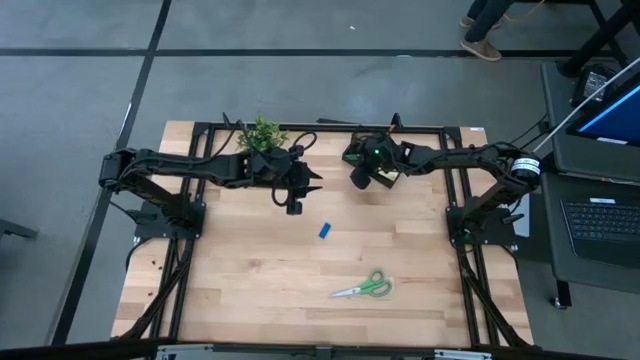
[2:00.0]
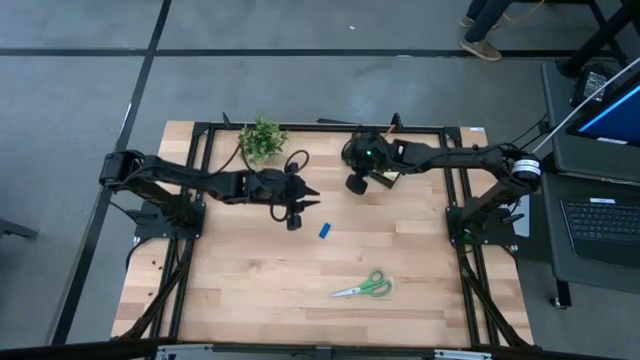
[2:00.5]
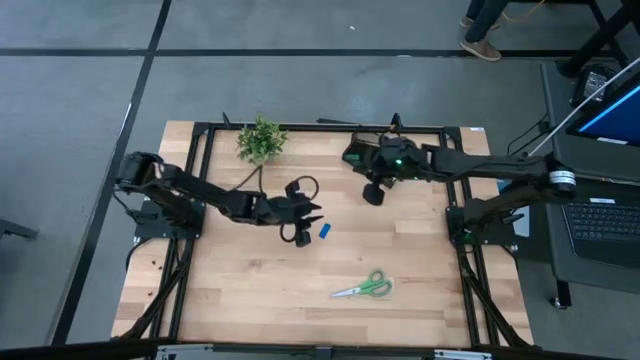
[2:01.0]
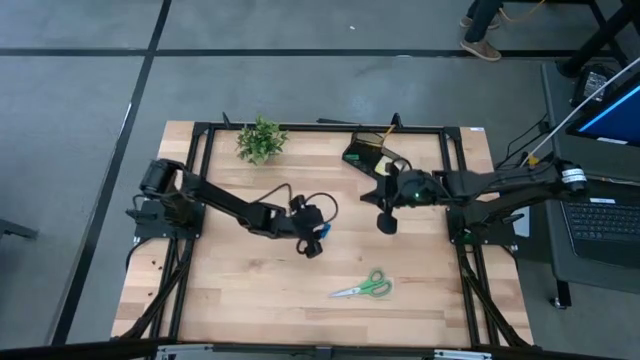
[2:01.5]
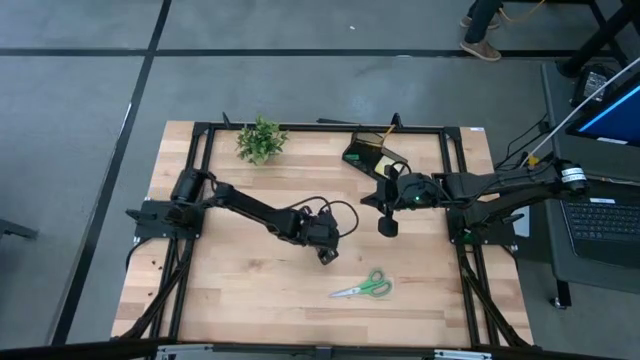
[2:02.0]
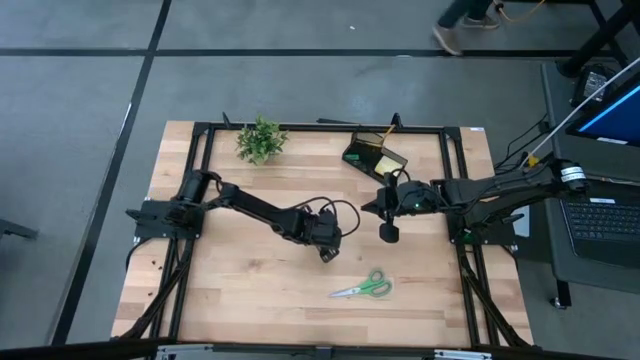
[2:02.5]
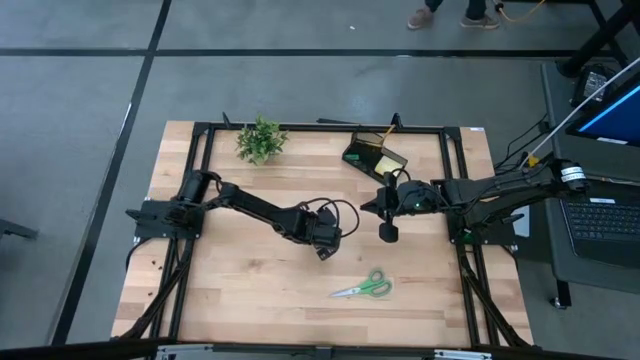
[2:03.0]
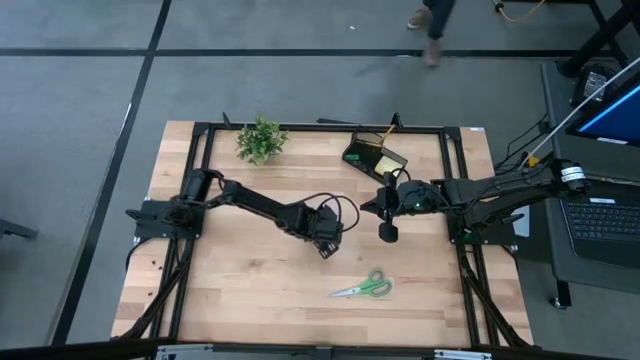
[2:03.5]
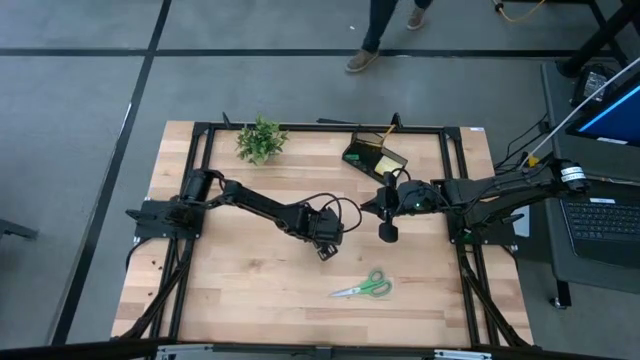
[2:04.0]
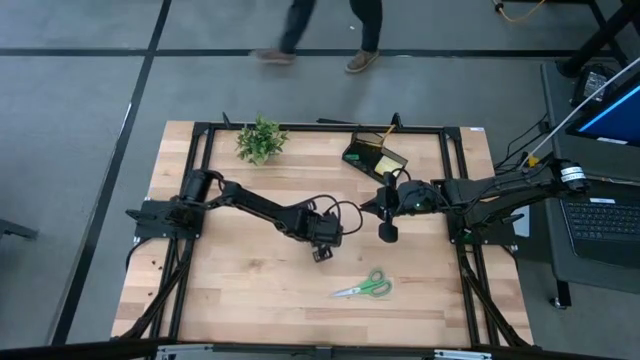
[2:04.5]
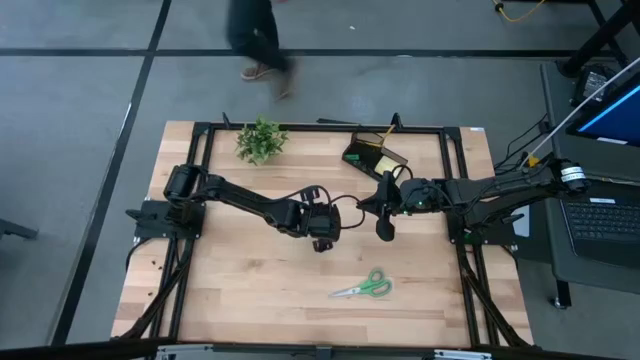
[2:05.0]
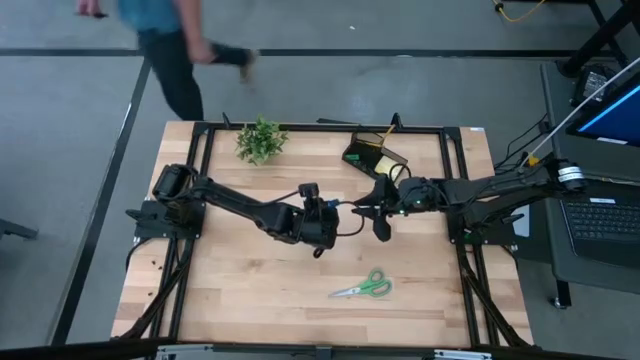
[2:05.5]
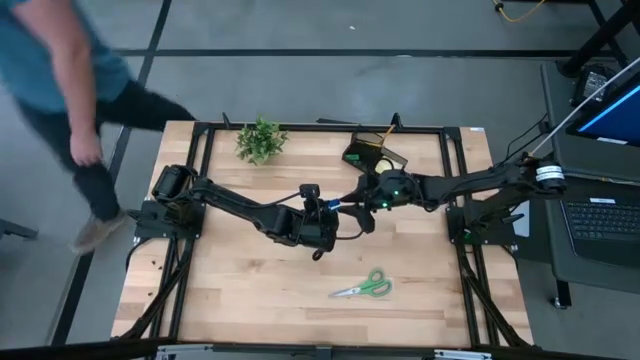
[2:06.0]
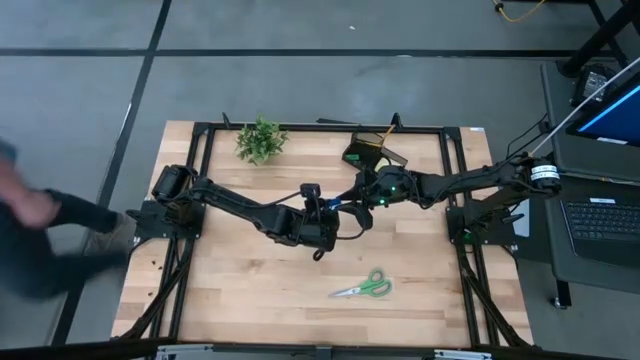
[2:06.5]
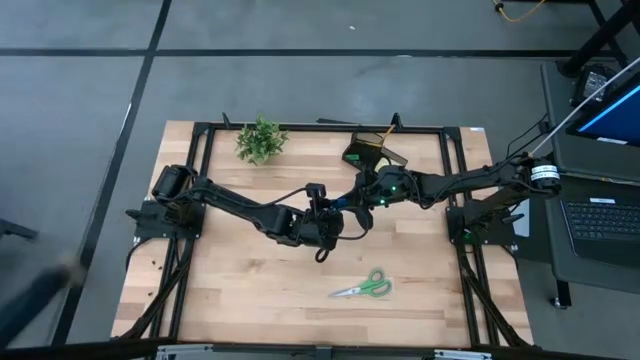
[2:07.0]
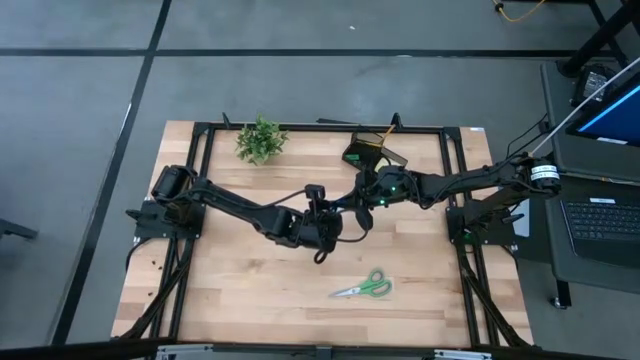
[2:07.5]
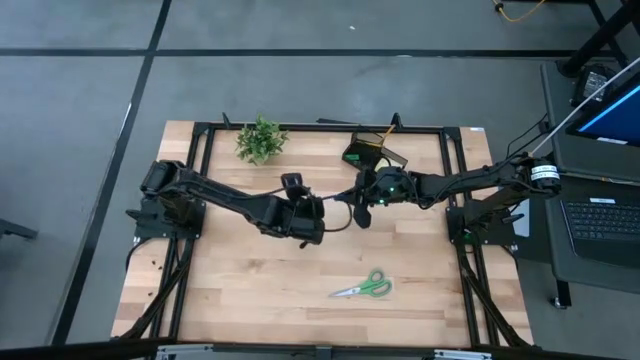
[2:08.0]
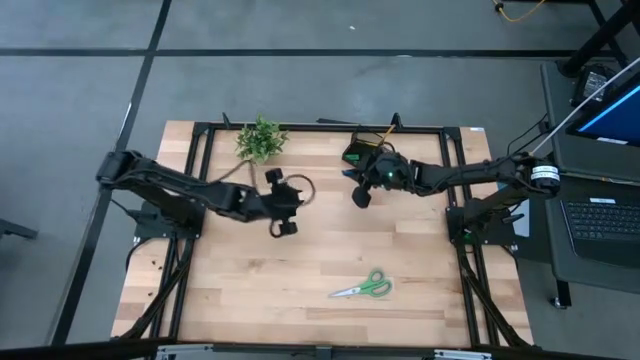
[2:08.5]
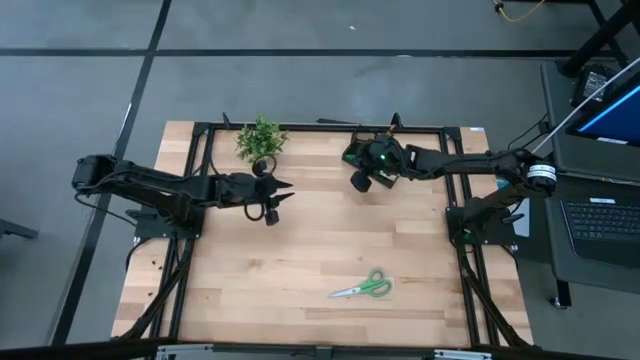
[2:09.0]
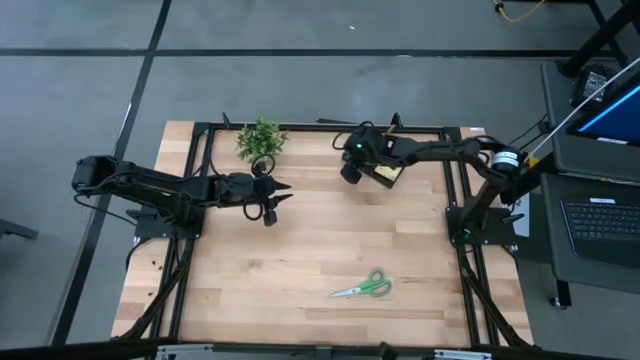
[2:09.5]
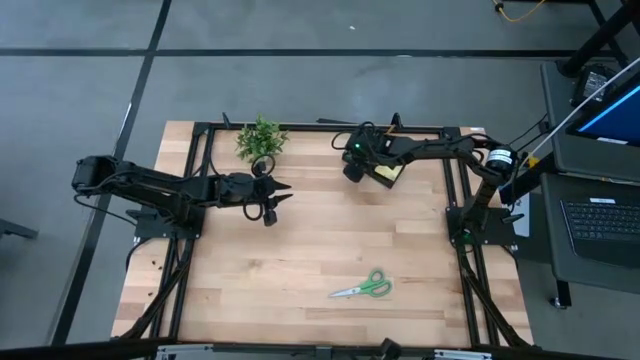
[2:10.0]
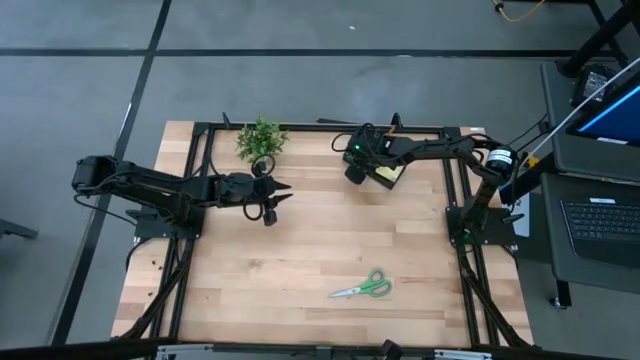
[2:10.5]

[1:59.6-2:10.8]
Task: Pick and place office supplies into organizer
Put the blue eraser into the black desk organizer

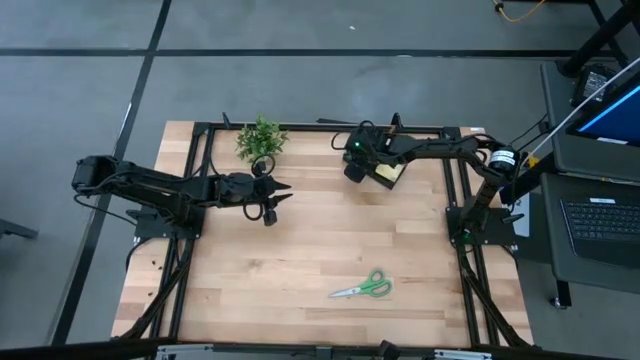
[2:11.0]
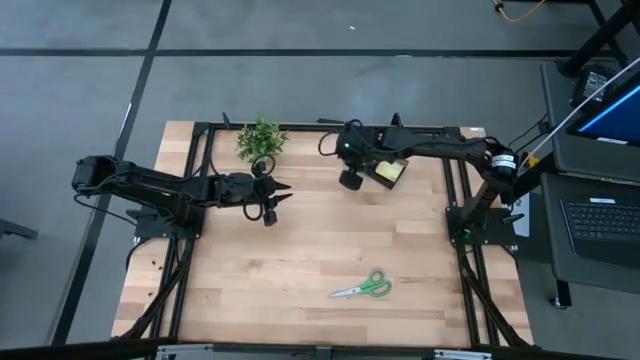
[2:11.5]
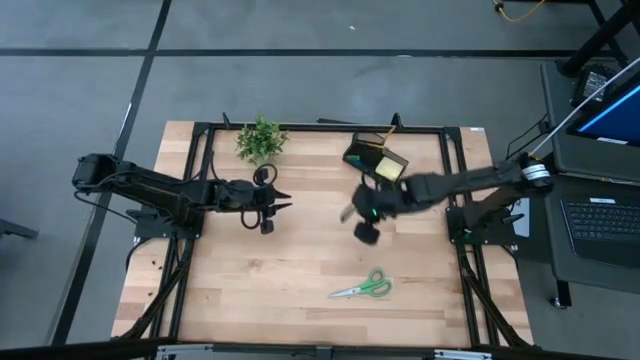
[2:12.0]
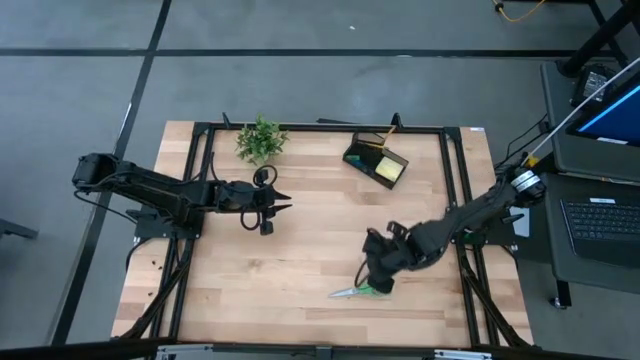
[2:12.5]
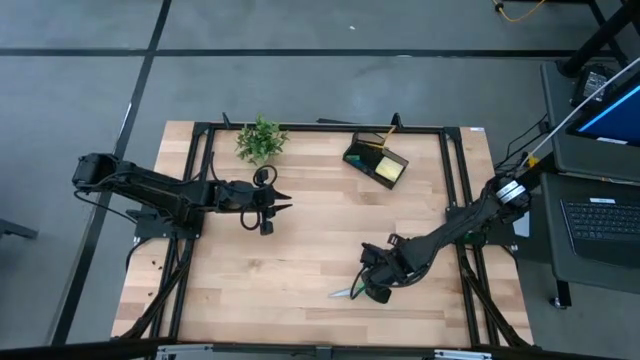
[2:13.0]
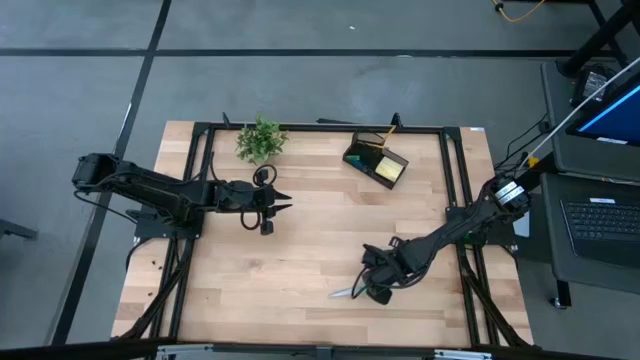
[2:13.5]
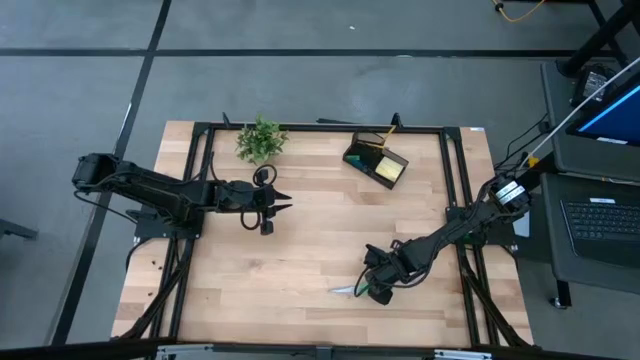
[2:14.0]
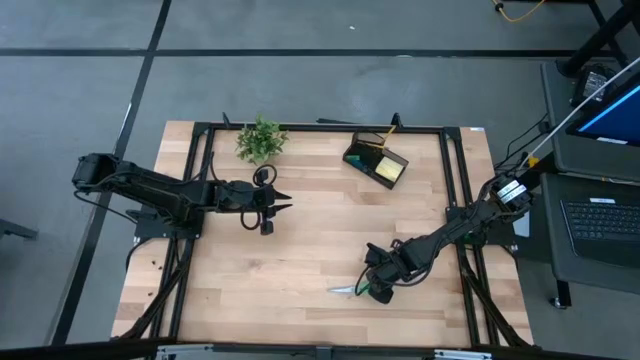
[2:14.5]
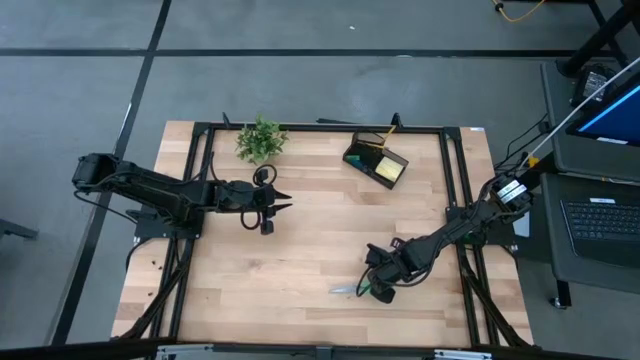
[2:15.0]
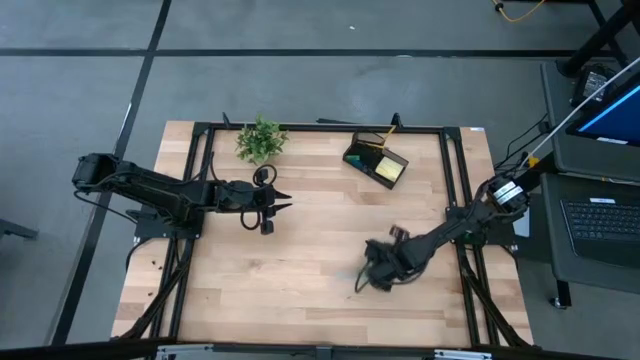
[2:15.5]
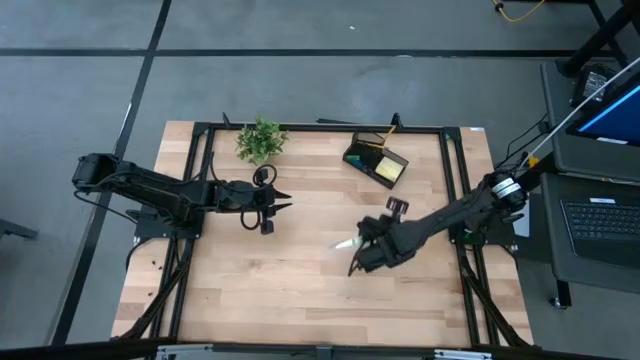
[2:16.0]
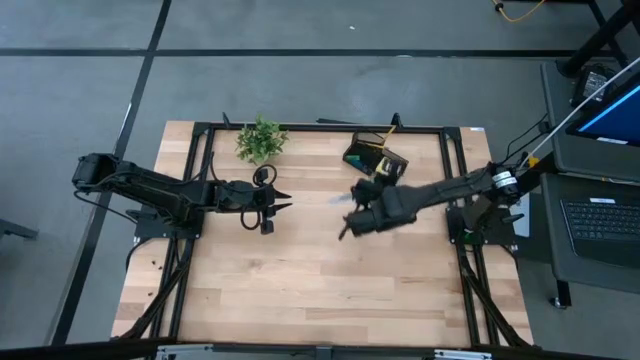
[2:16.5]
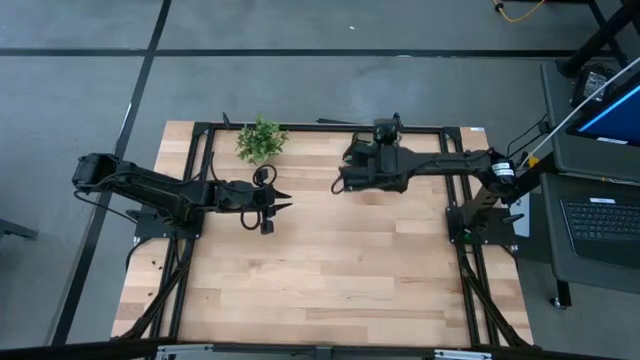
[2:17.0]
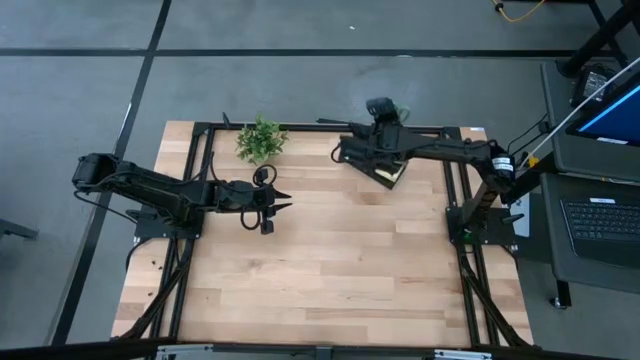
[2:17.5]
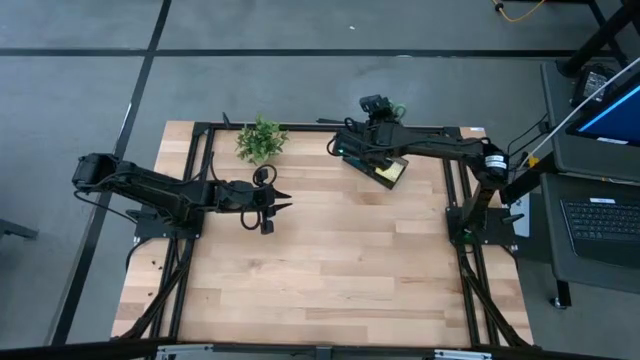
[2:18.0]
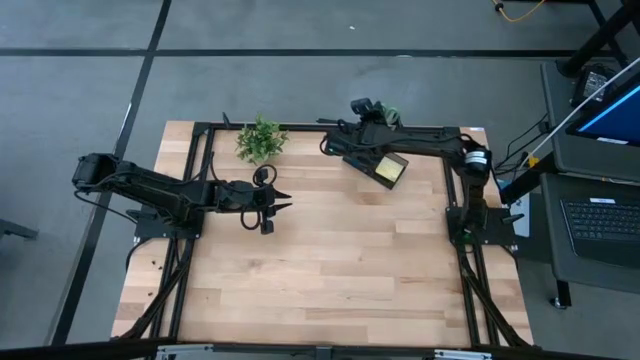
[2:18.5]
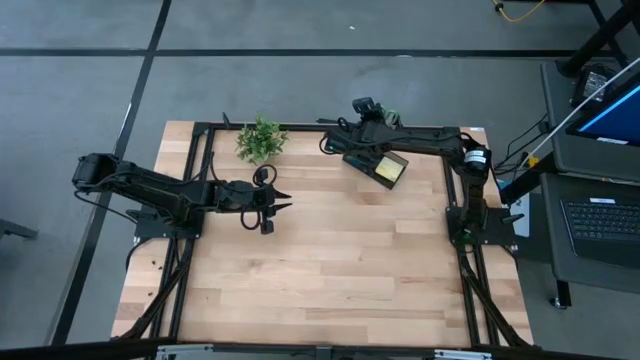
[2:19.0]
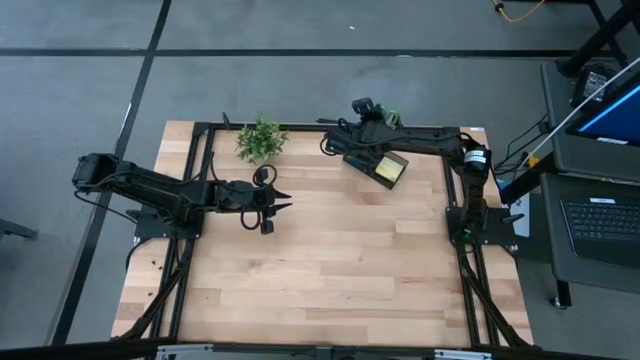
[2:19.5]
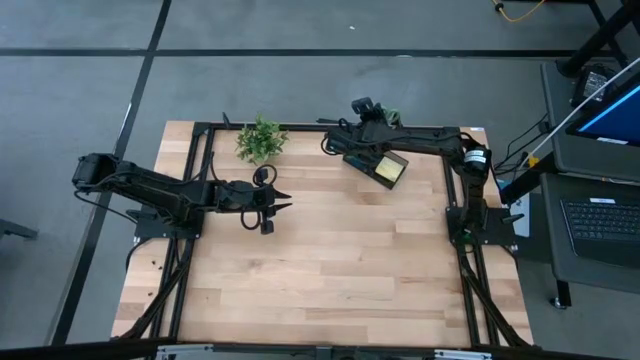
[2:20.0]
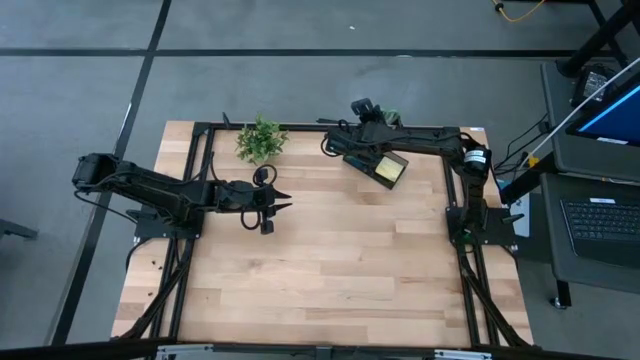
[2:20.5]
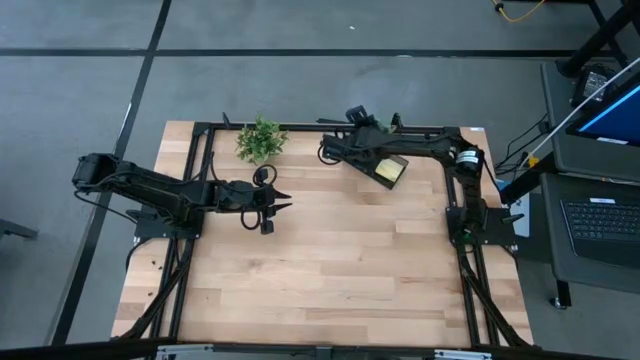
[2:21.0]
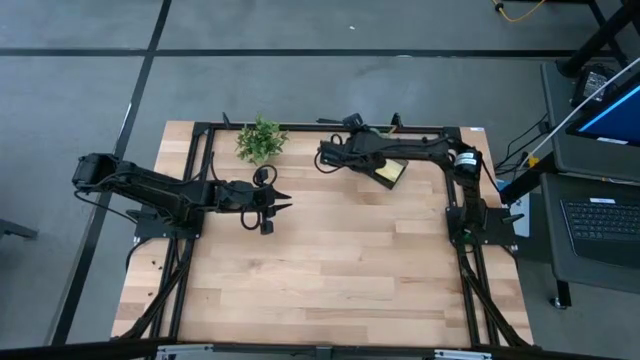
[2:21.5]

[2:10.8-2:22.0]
Put the green scissors into the black desk organizer
